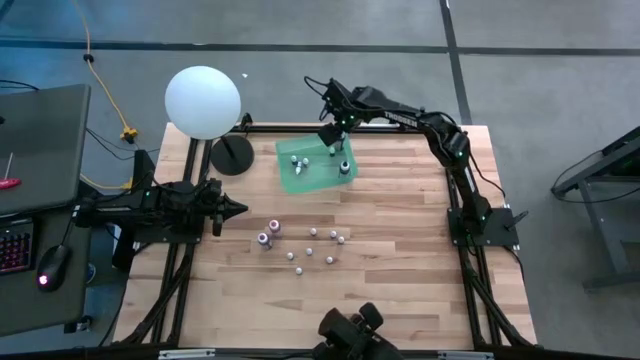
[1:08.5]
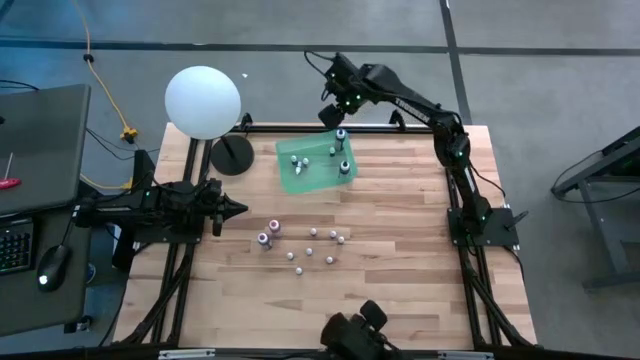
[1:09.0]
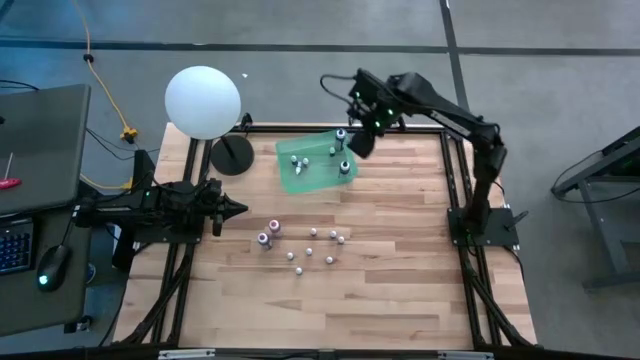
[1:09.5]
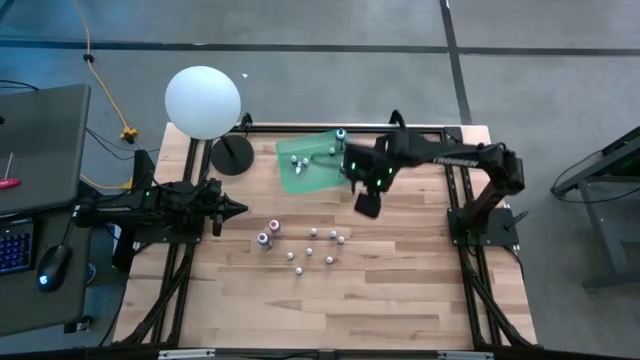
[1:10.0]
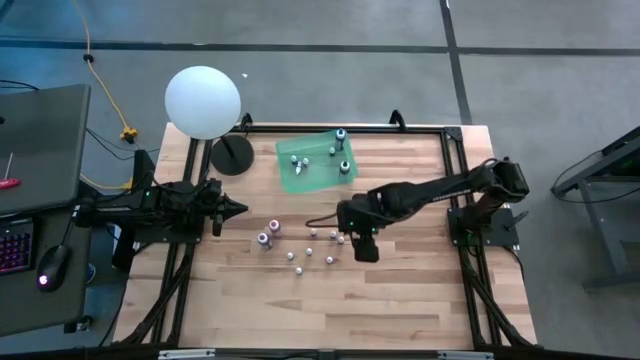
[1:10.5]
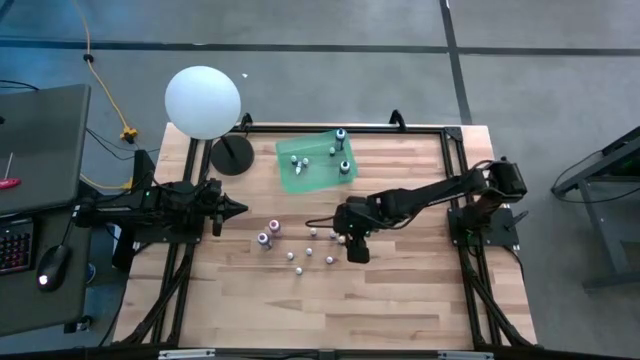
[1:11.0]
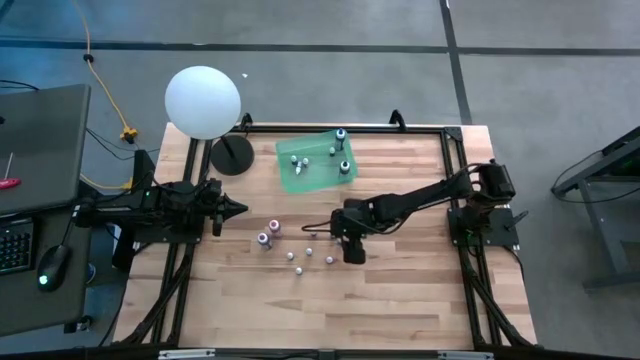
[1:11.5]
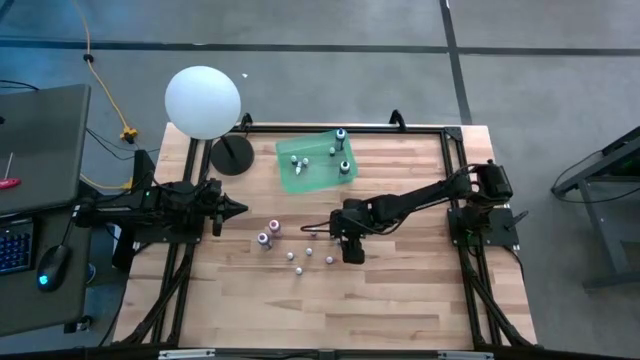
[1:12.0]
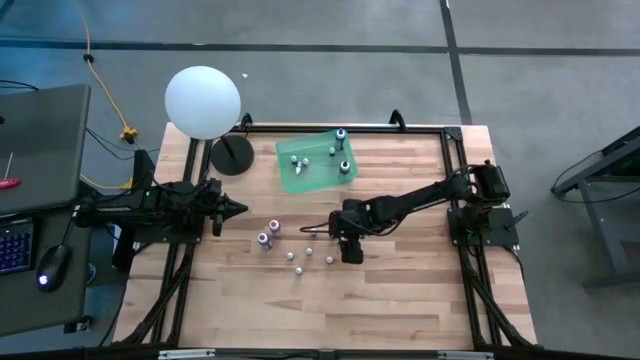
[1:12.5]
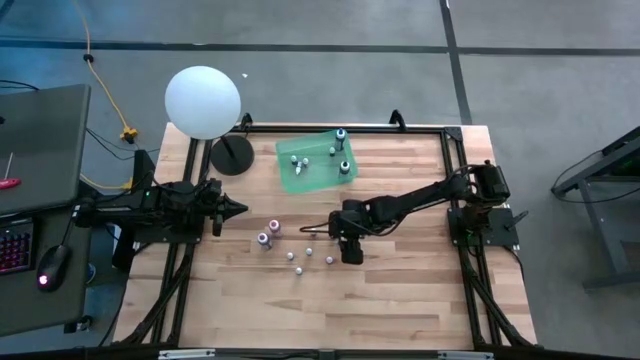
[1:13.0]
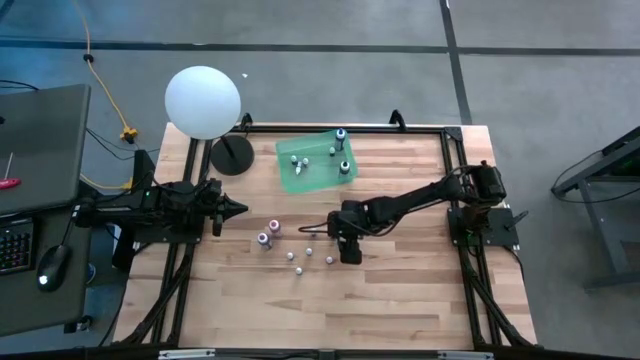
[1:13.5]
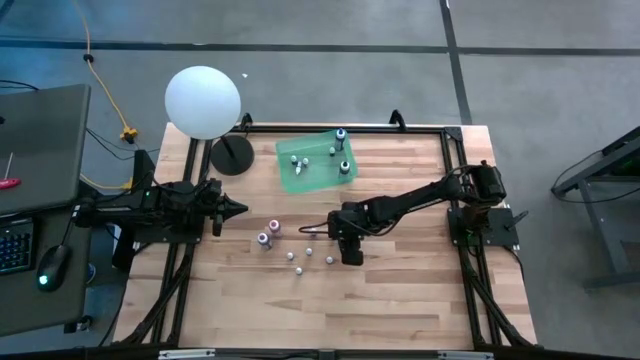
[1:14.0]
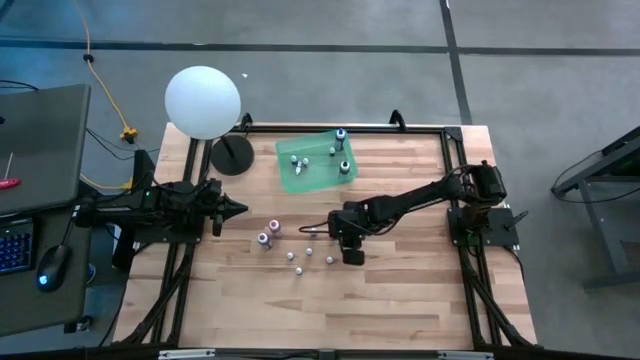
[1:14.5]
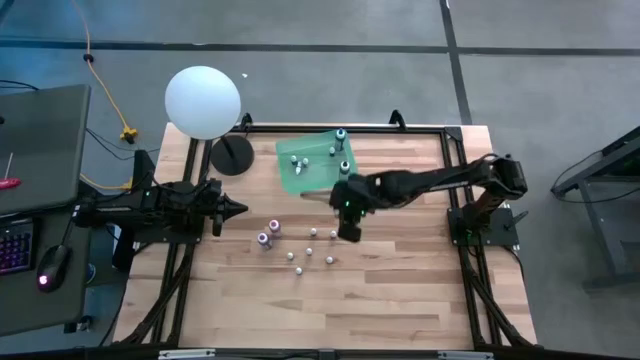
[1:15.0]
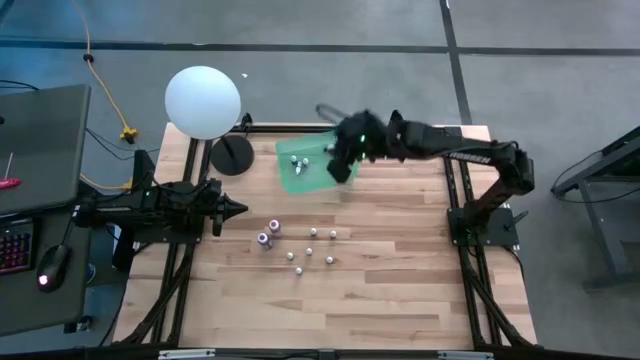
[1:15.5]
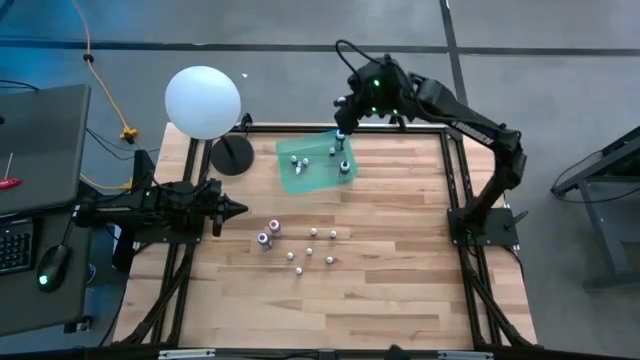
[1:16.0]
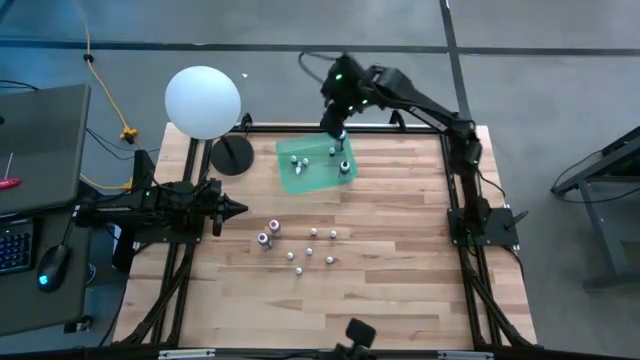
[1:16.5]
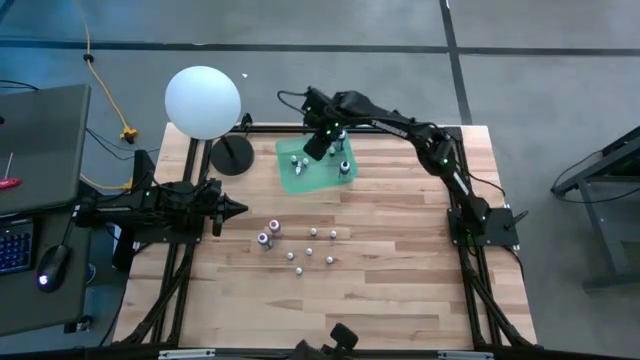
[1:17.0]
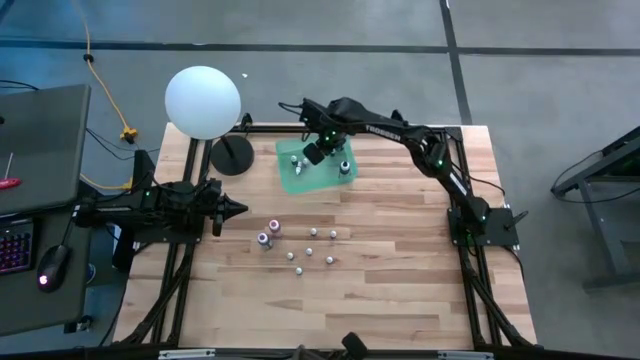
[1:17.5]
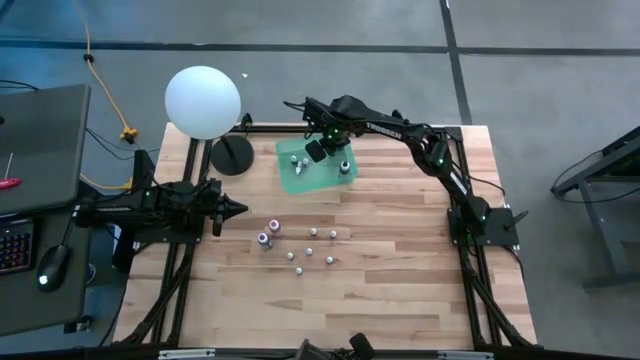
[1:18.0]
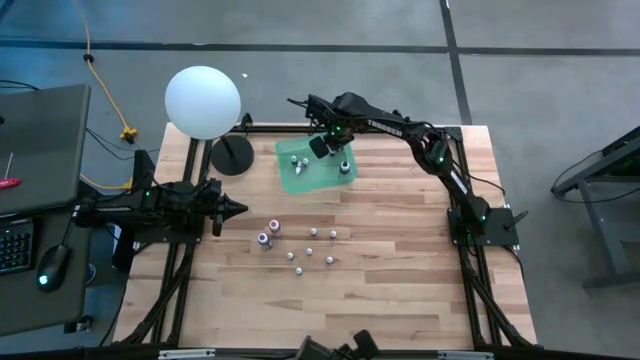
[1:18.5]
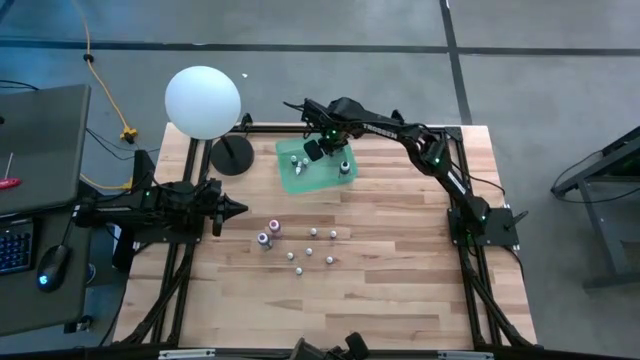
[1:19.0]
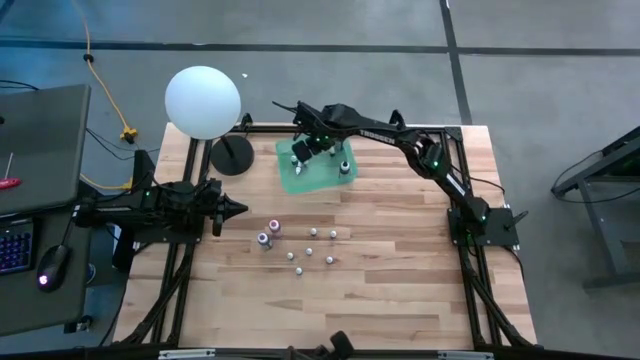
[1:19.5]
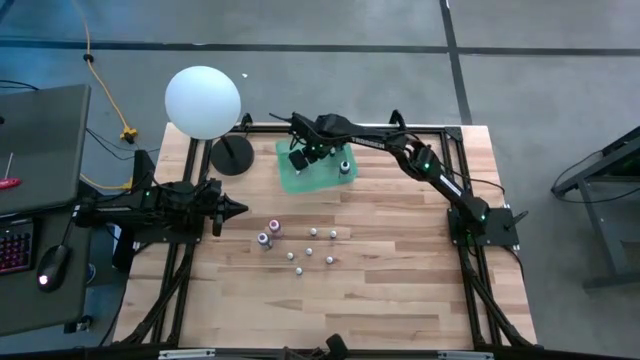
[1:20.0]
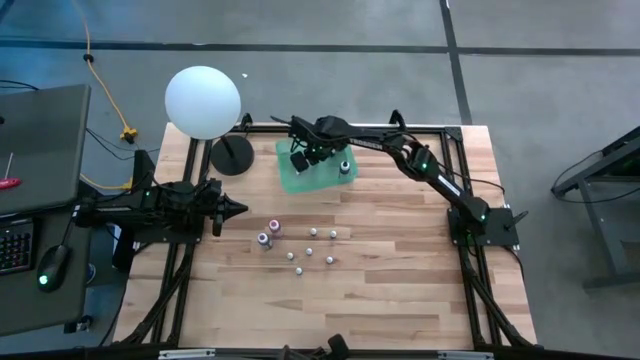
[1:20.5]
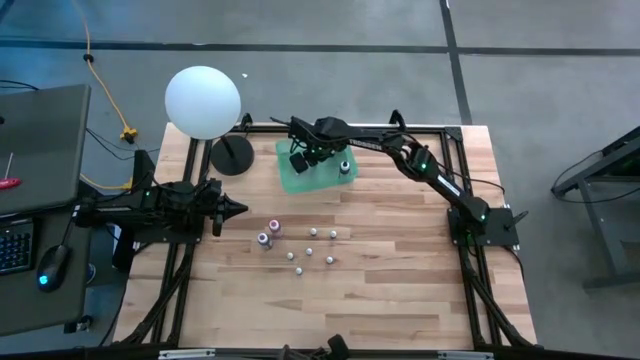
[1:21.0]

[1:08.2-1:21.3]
Task: Pick & Place food coloring
Put the small red dye bottle in the green bin

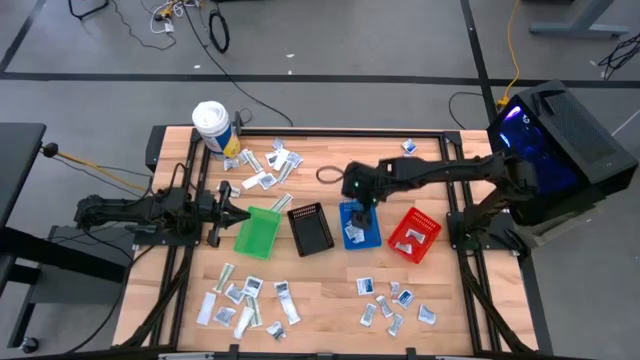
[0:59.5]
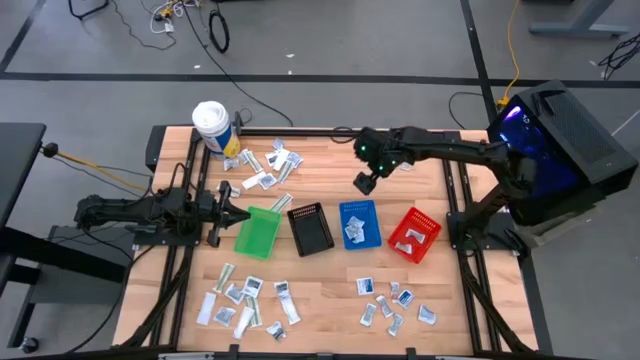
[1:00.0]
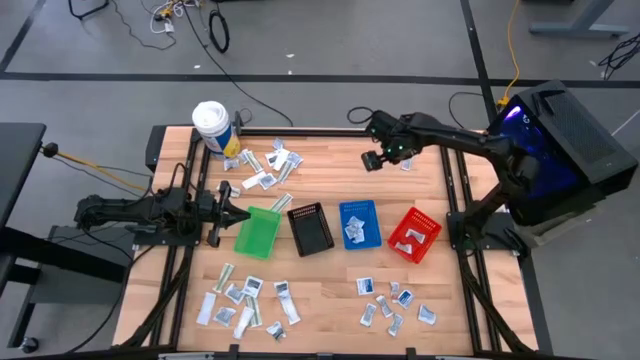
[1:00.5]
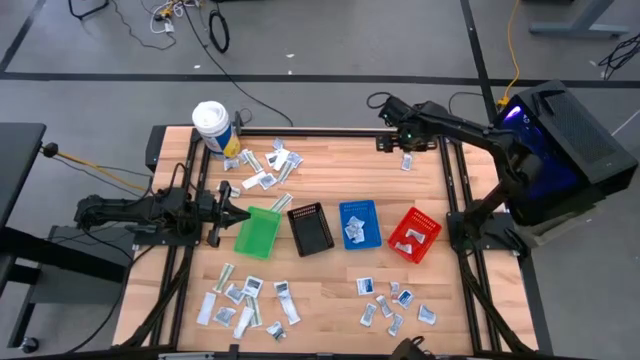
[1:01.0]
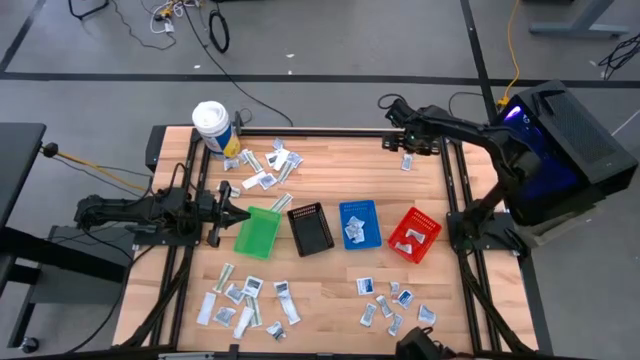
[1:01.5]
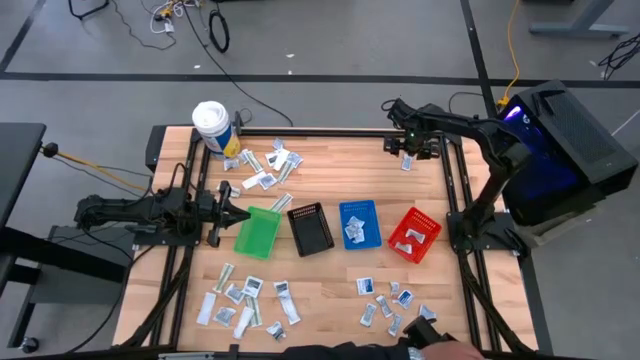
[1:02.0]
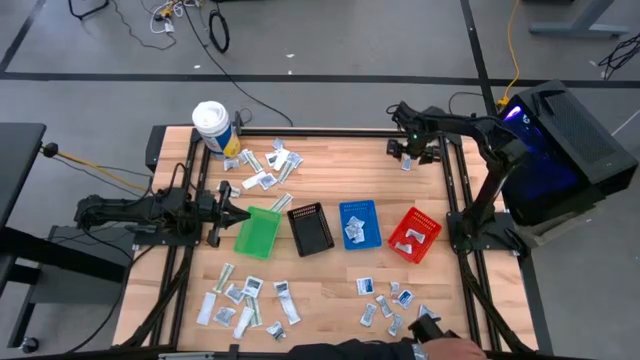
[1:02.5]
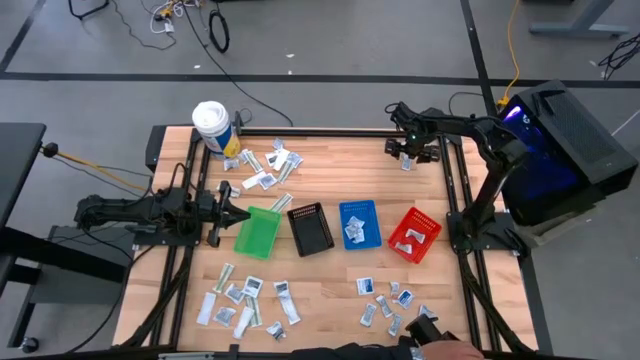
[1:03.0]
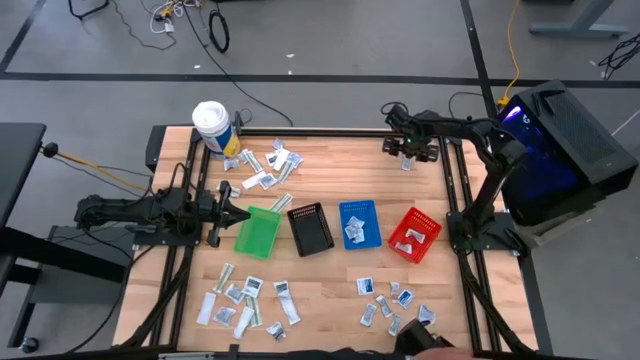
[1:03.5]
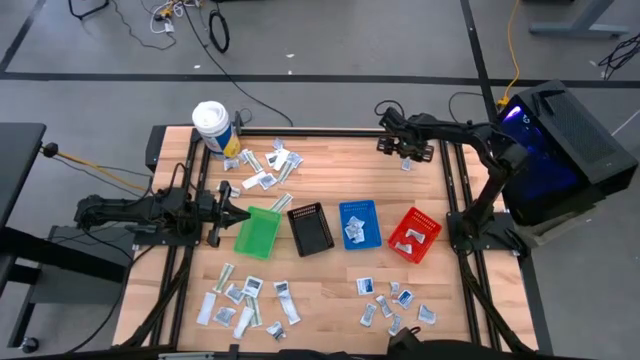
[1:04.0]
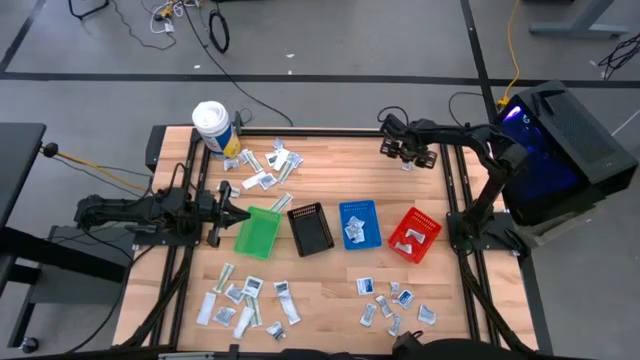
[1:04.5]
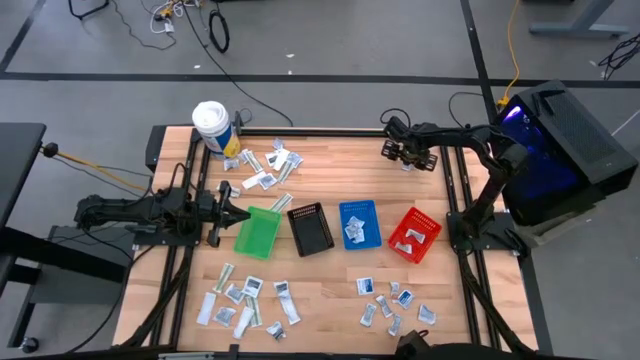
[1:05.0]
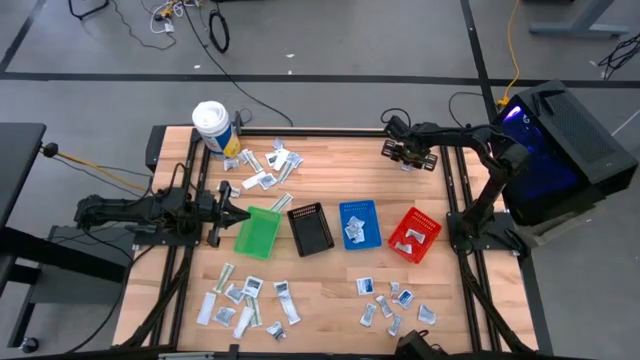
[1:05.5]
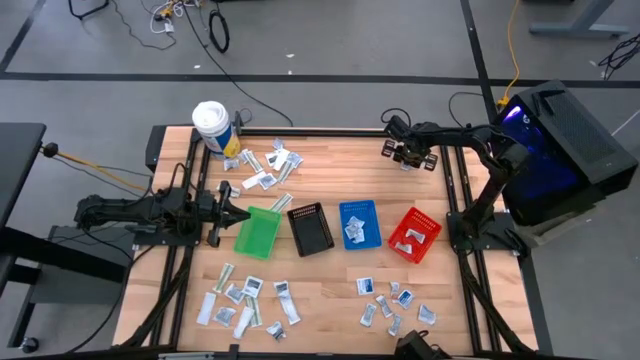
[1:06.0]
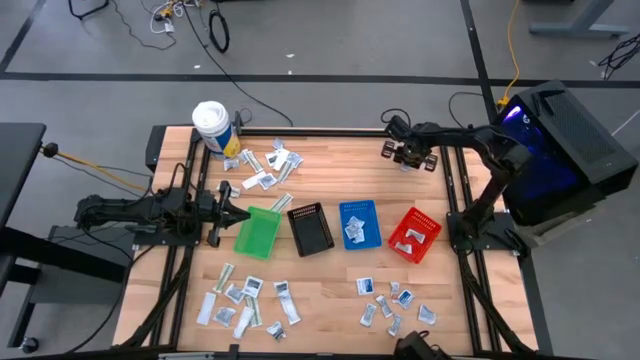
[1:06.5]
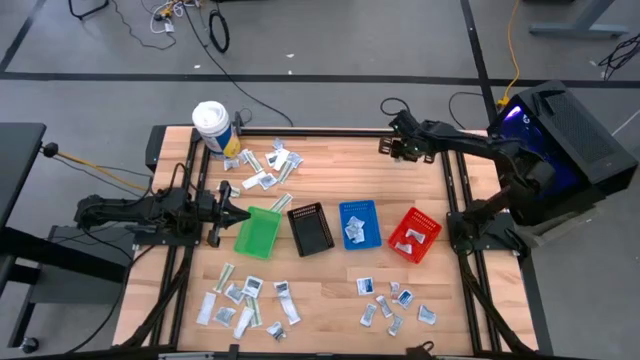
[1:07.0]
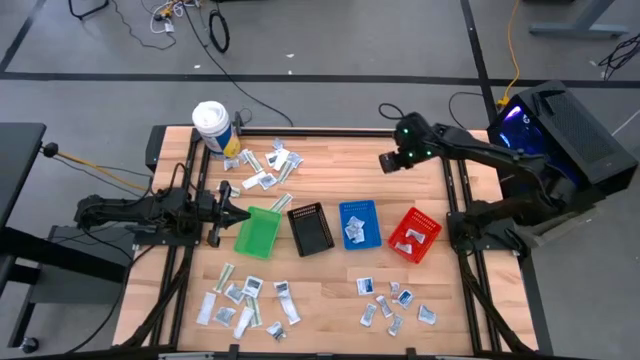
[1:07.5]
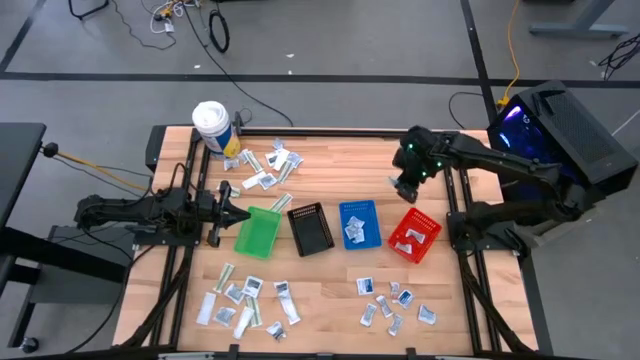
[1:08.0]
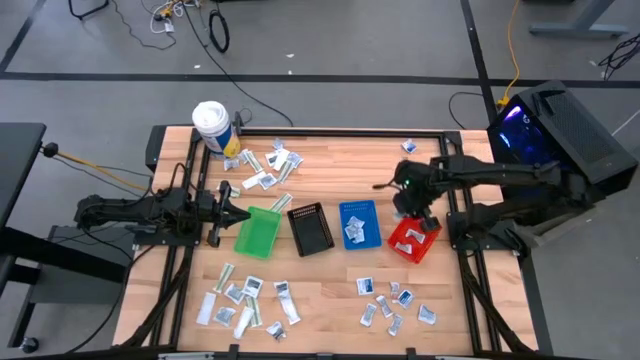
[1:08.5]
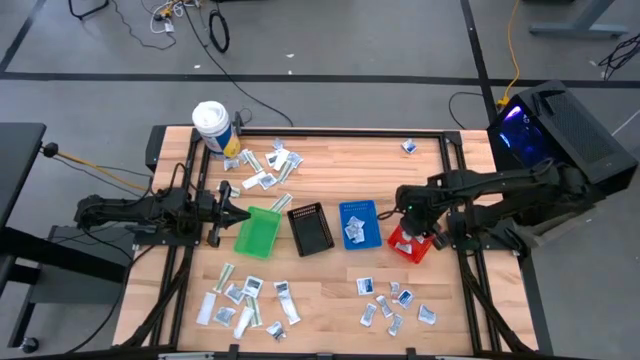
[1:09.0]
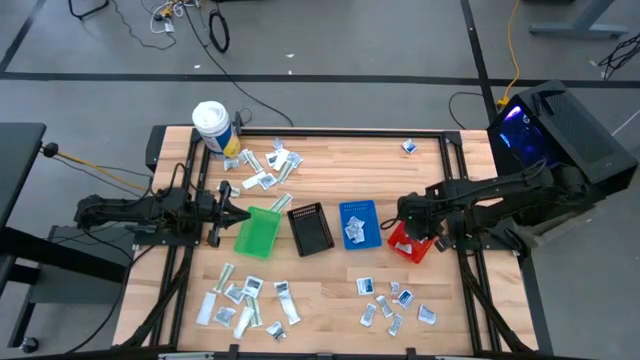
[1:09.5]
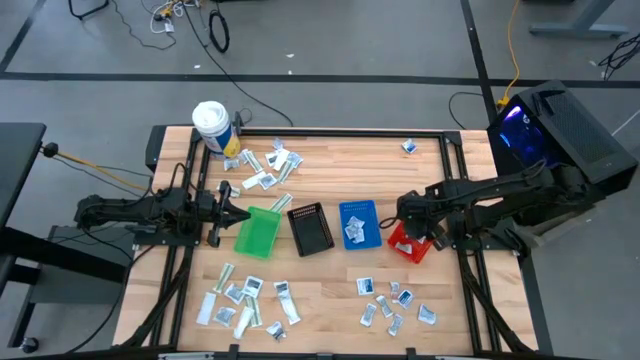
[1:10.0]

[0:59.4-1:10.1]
Task: Pick & Place First Aid Supplies
Put the ointment pack into the red basket
